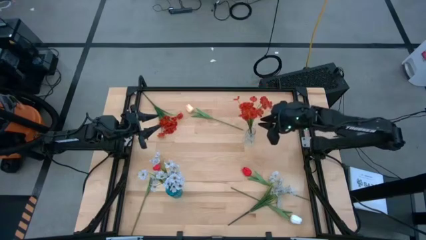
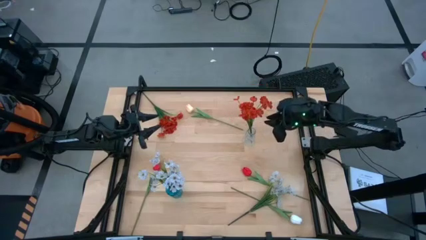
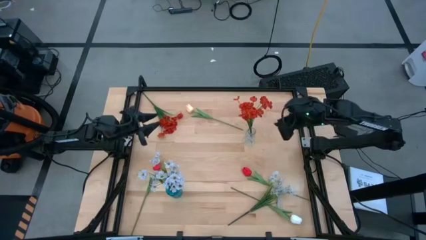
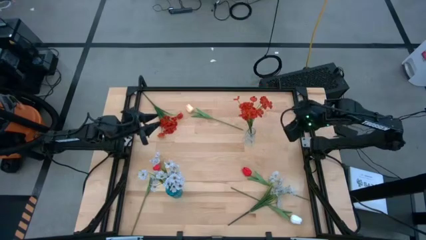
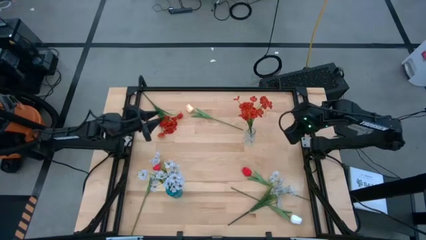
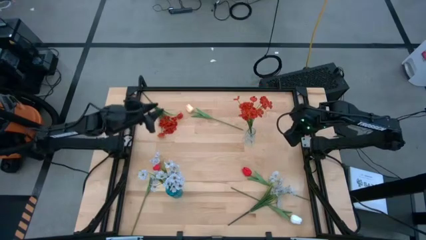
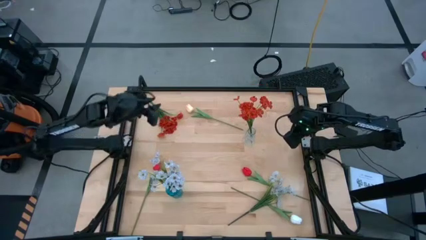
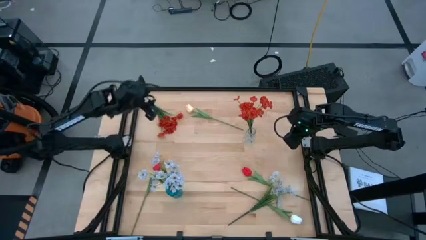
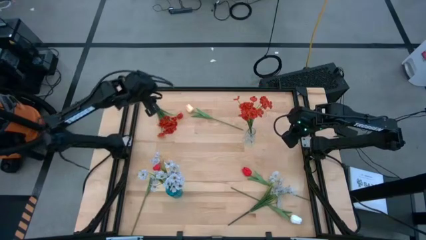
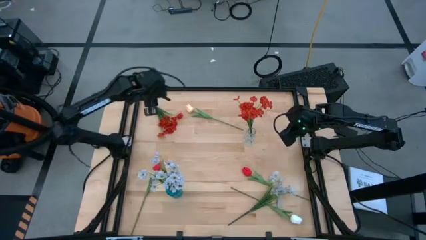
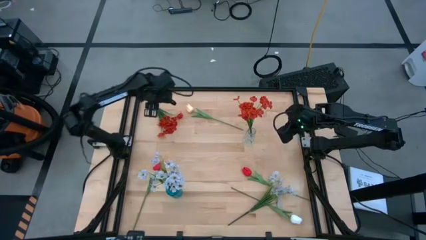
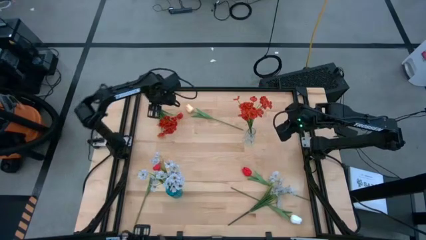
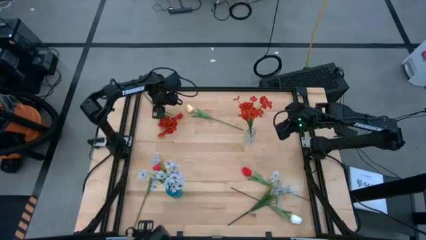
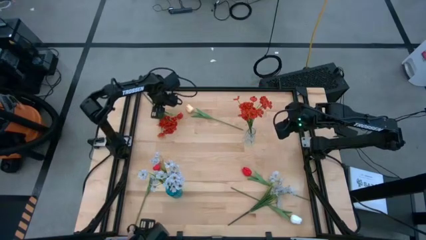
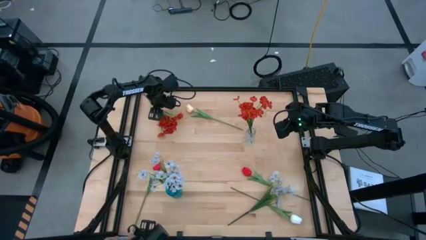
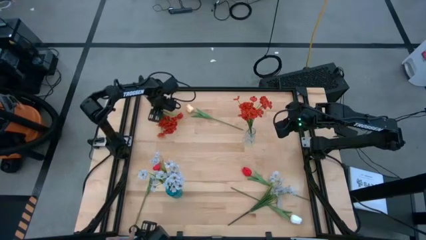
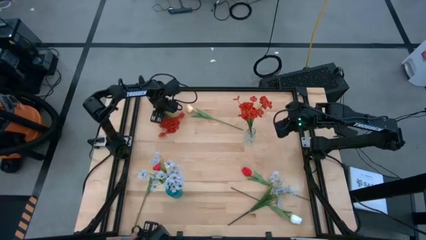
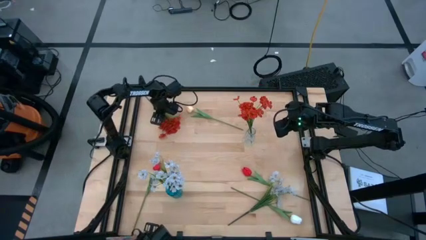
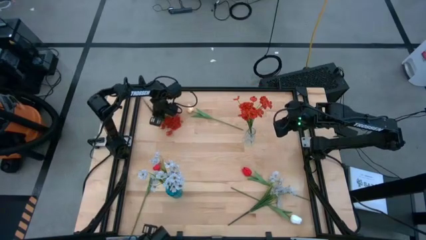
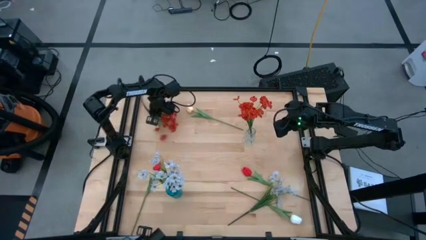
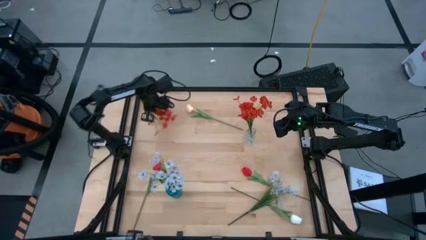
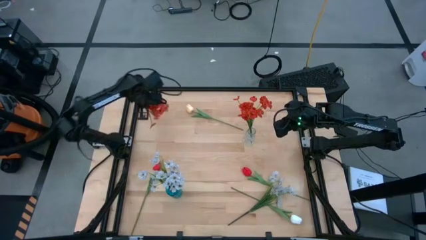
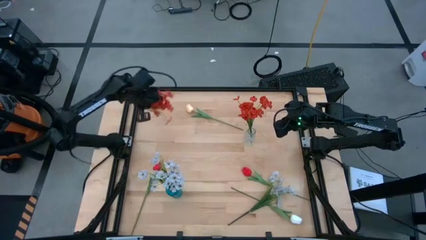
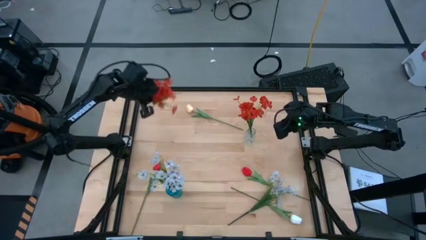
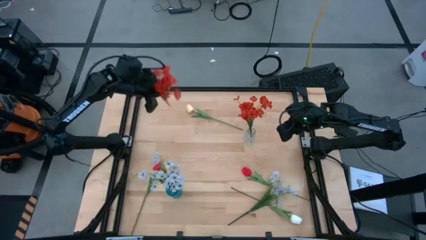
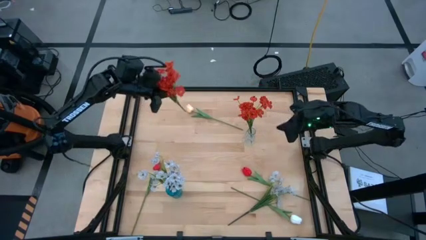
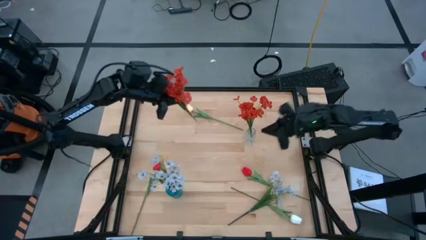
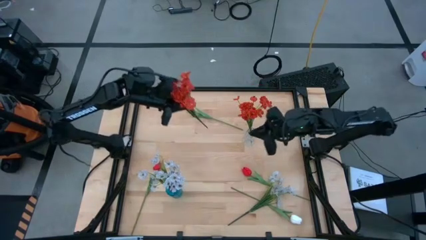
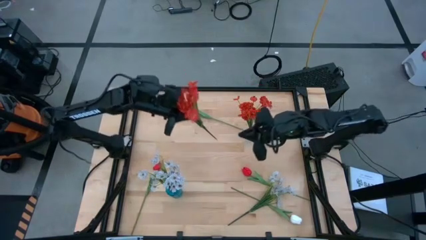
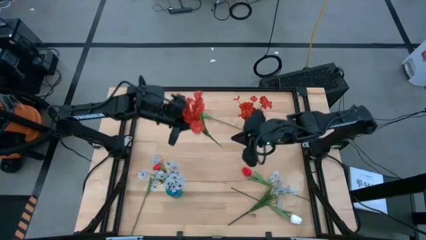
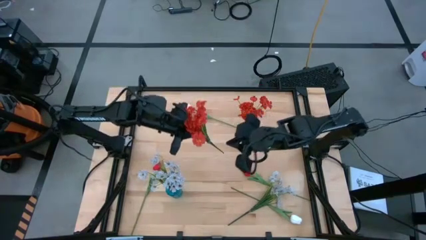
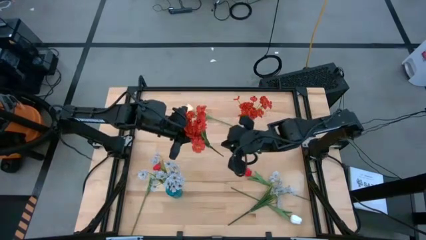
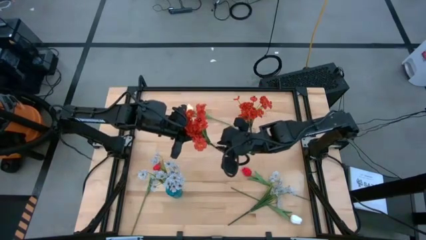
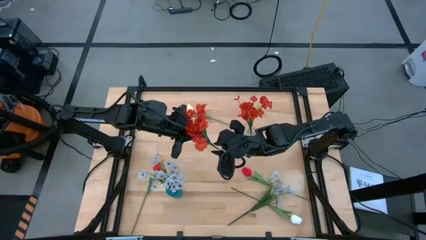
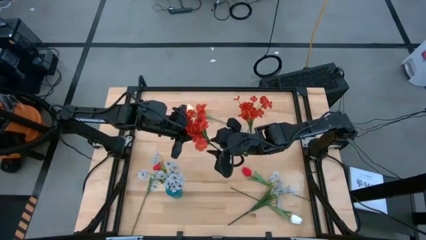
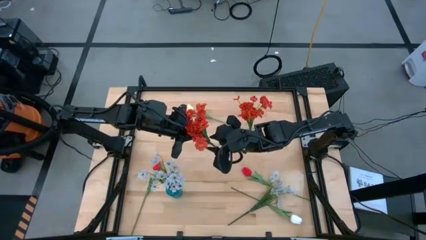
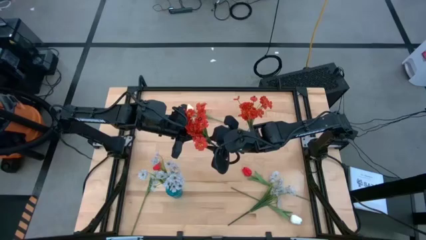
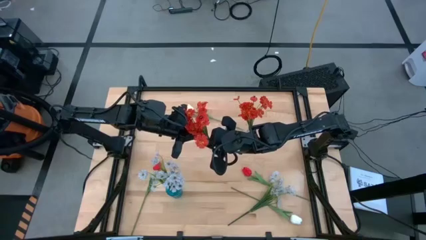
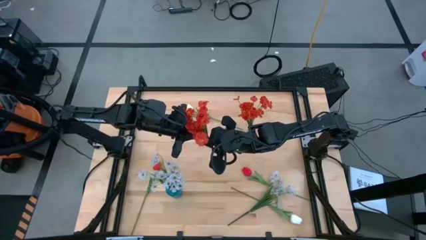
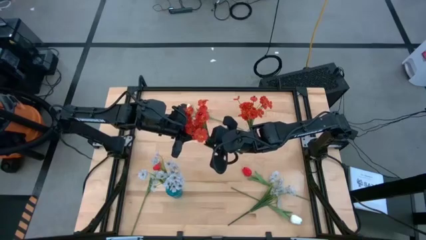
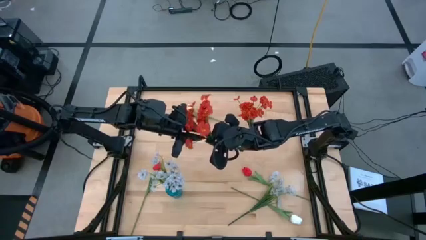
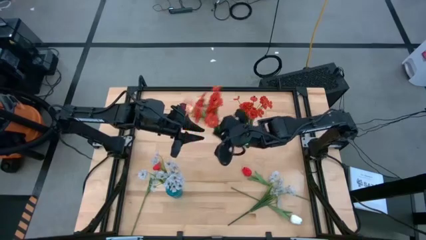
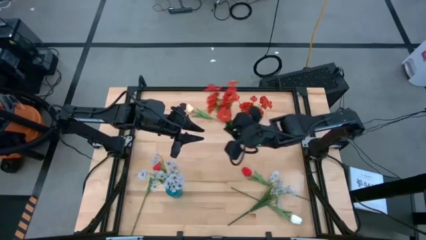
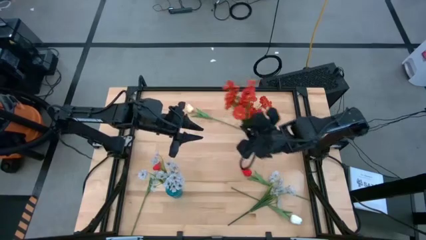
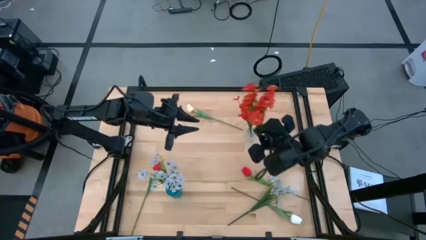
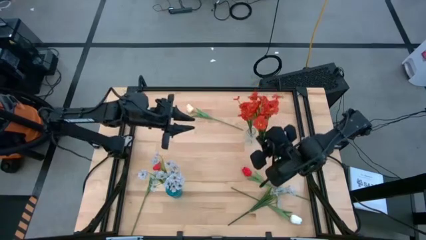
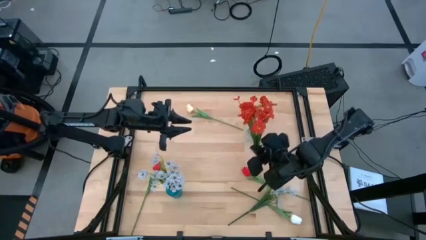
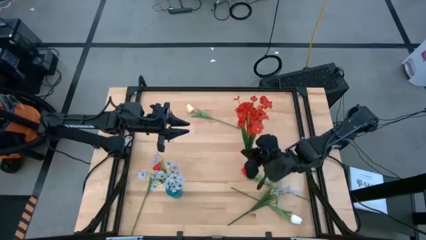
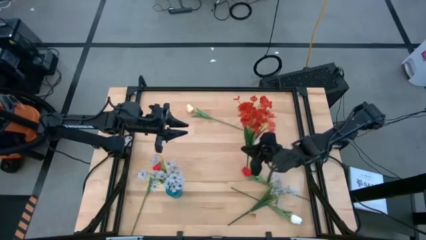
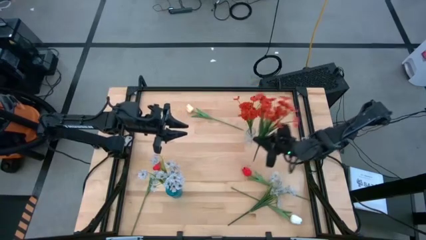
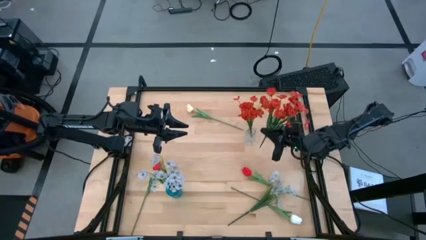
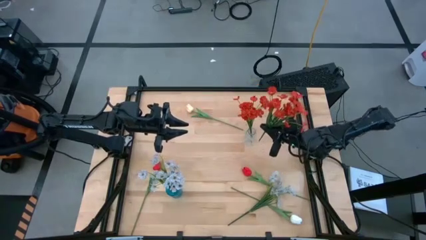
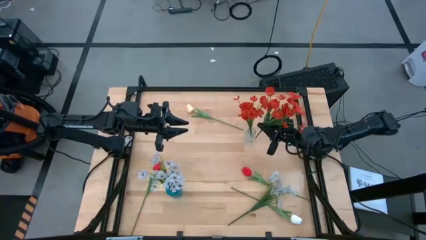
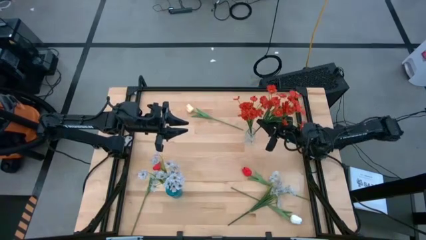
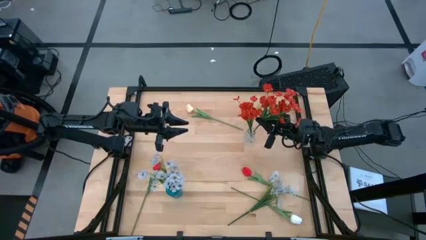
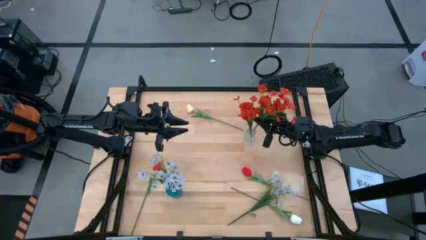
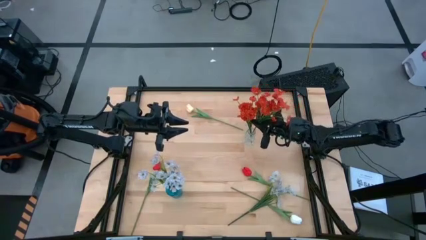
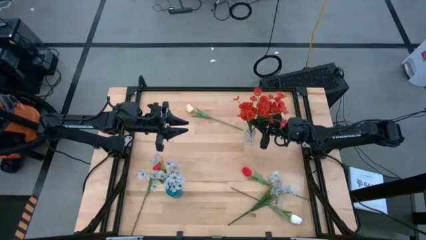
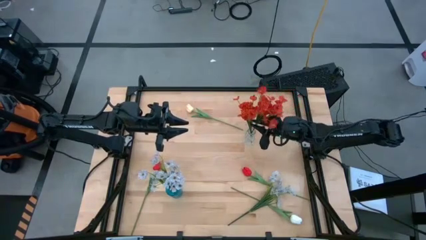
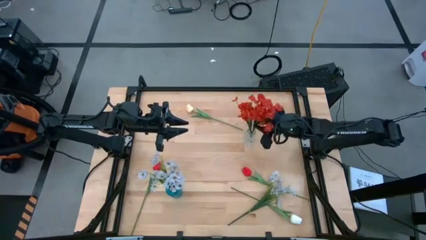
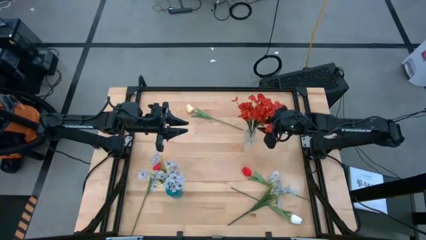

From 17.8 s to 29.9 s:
Task: Sort flowers into vase by color
Put the red flowers into the transparent flower vase

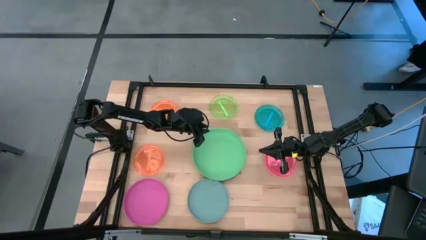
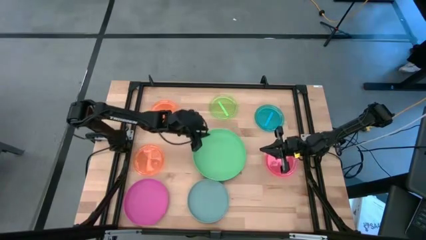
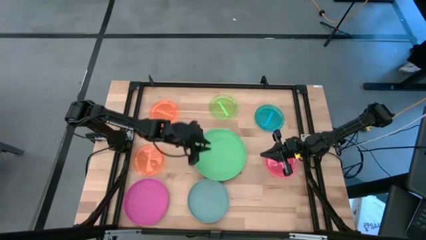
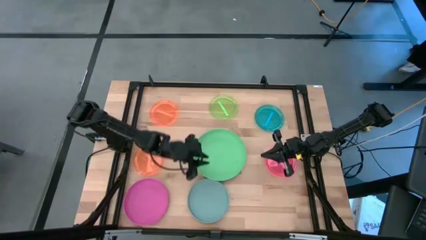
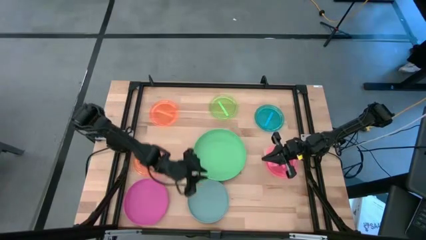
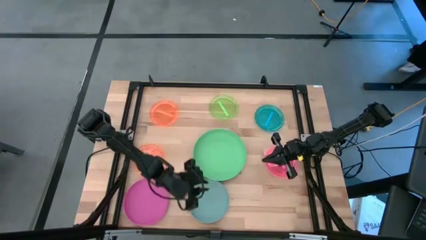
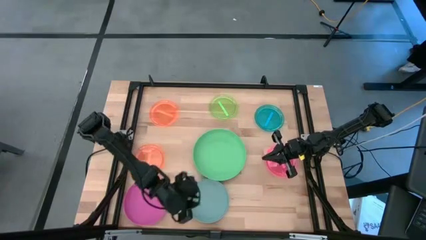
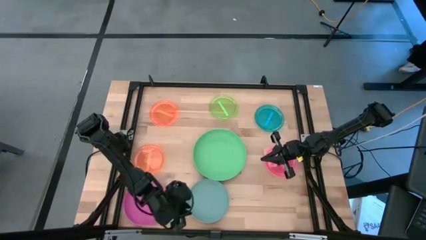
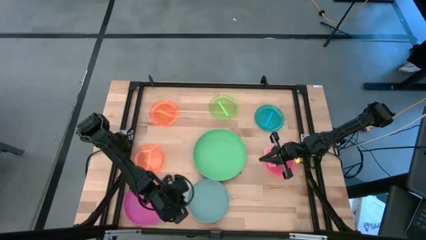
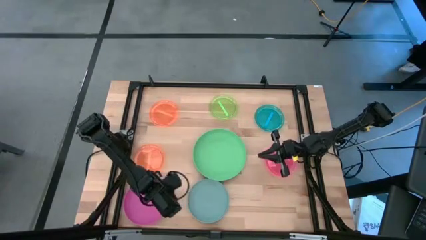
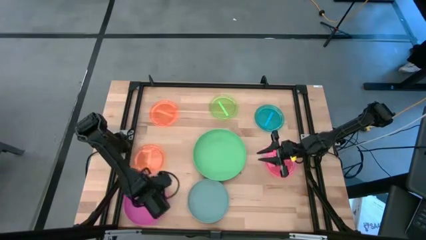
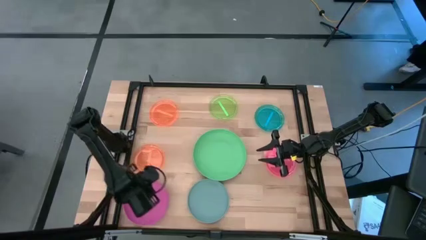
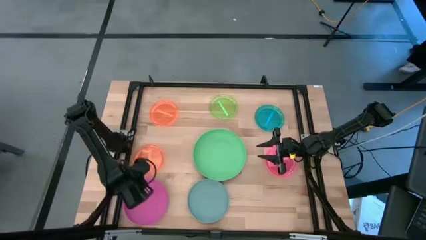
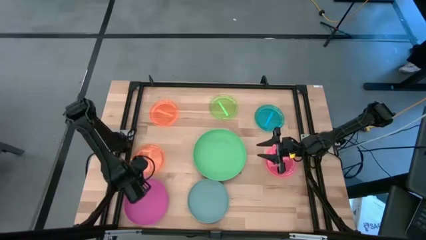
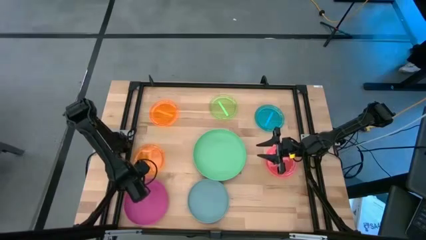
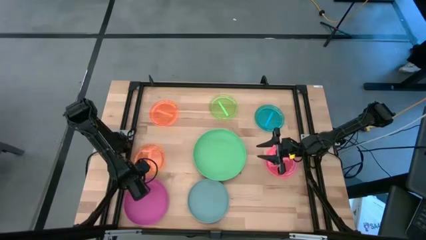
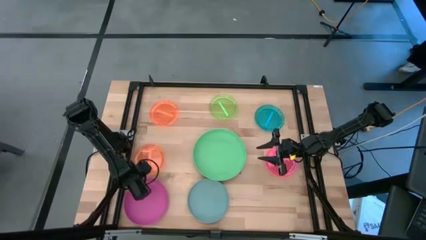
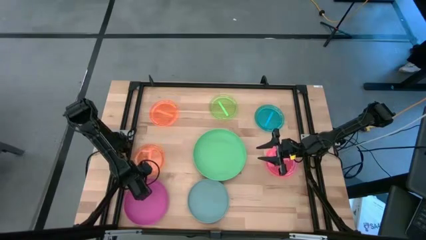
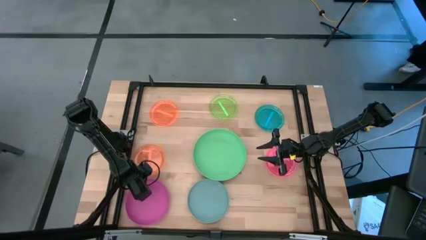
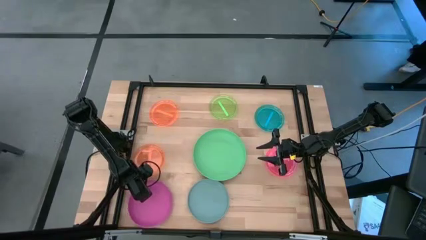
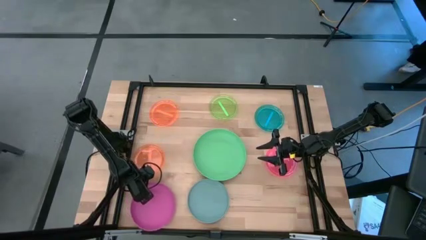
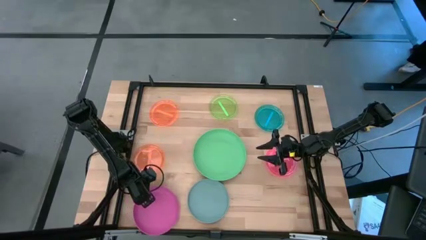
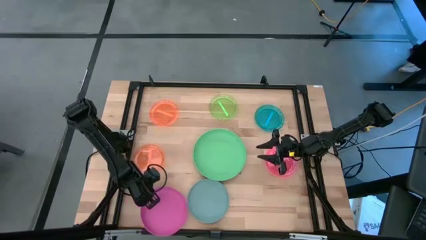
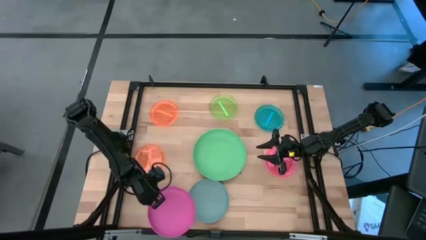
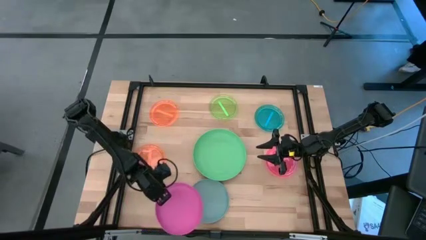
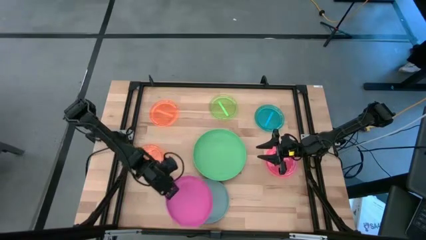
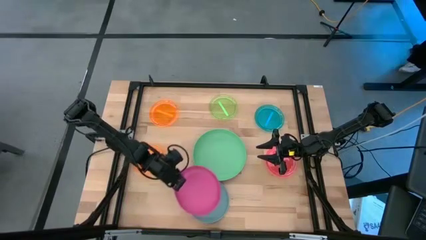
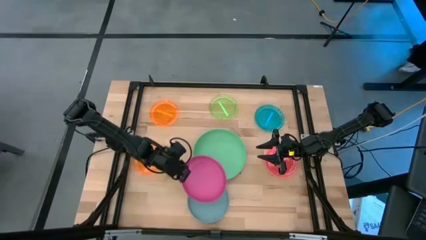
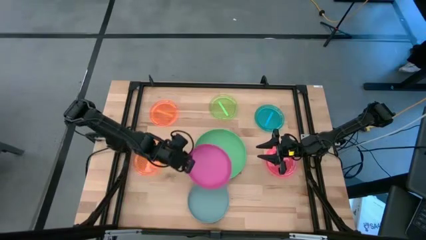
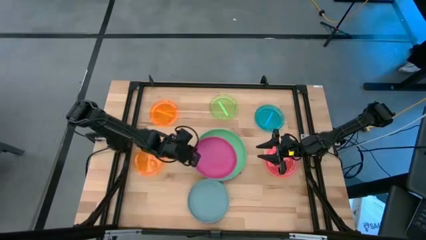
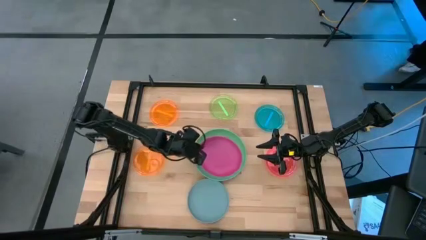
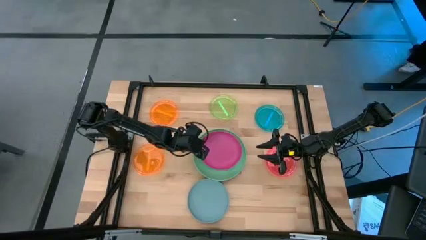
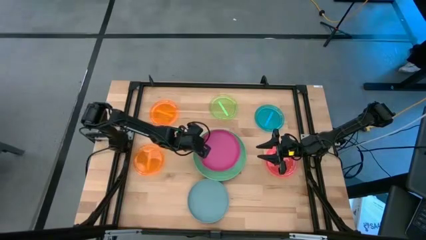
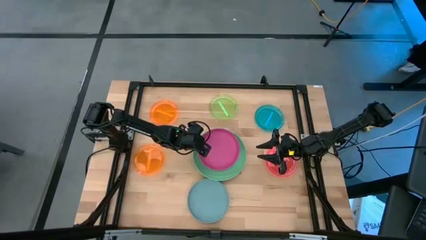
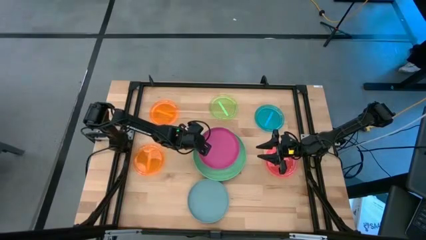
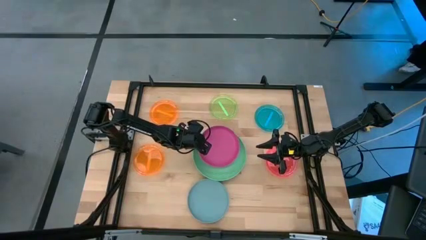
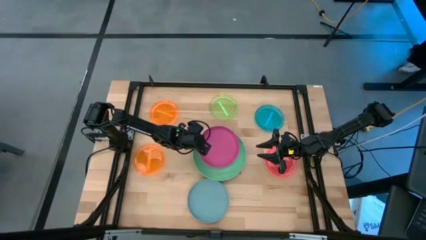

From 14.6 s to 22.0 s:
Task: Stack plastic plates
Stack the pink plate on top of the green plate
